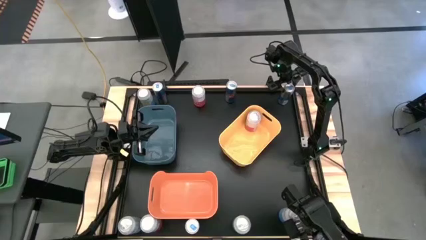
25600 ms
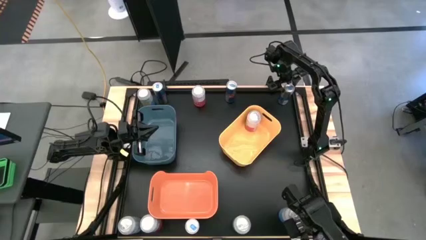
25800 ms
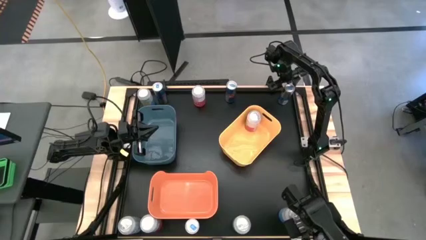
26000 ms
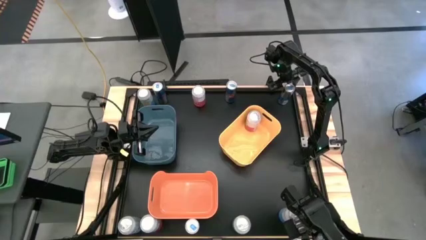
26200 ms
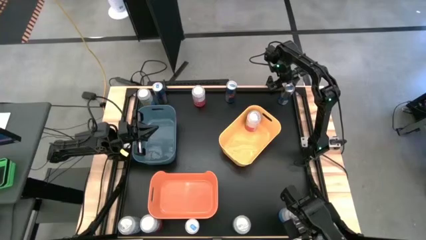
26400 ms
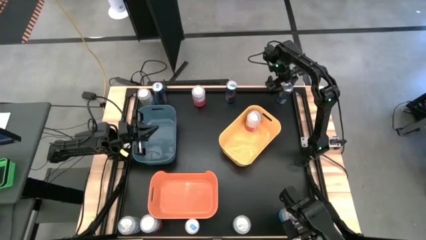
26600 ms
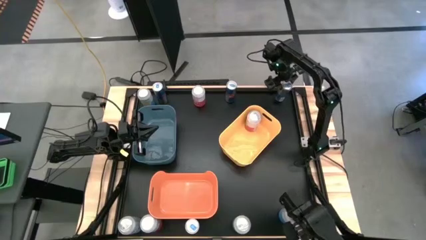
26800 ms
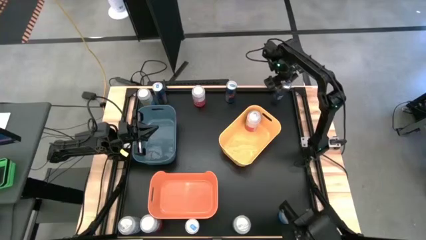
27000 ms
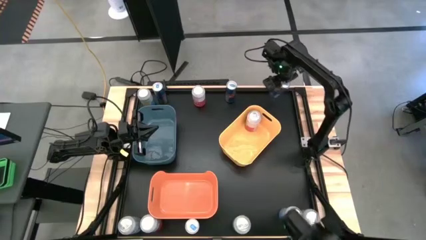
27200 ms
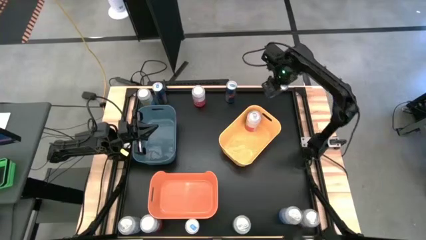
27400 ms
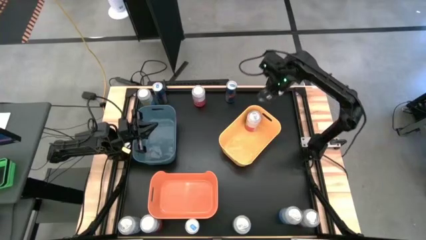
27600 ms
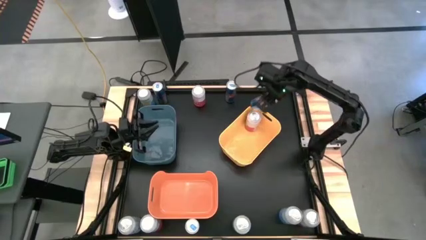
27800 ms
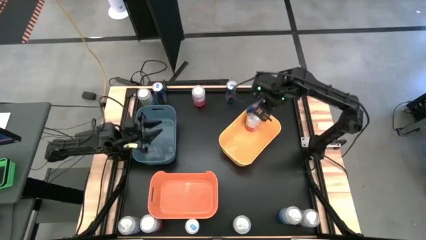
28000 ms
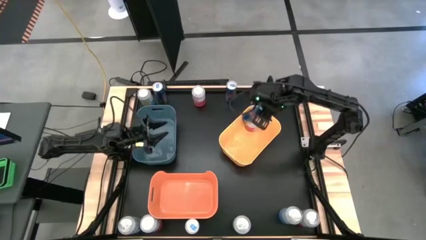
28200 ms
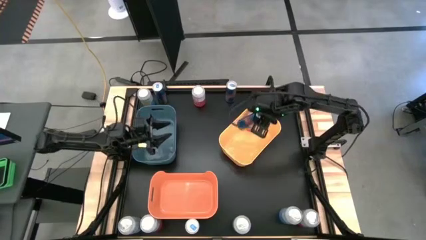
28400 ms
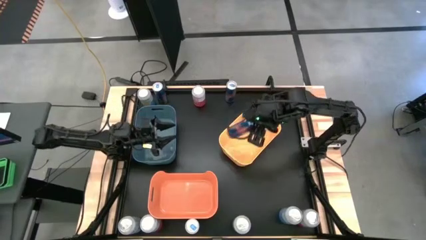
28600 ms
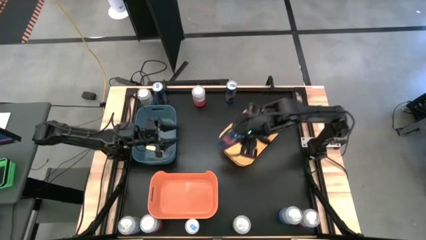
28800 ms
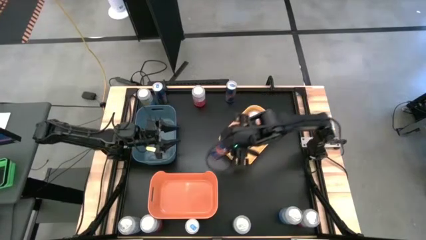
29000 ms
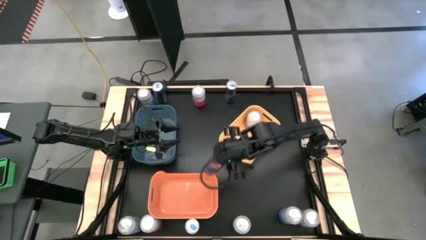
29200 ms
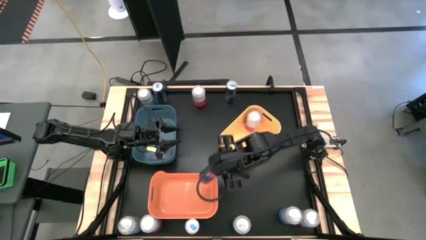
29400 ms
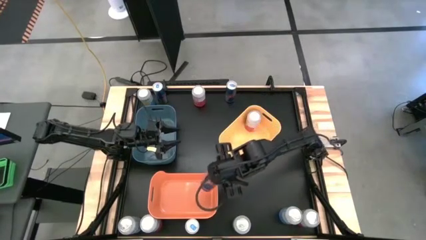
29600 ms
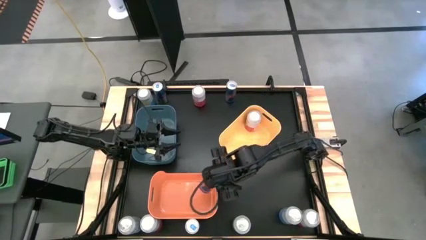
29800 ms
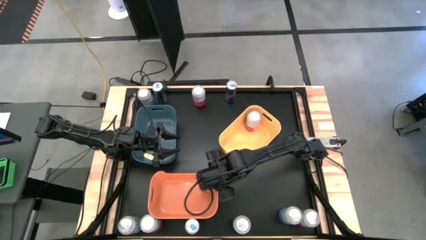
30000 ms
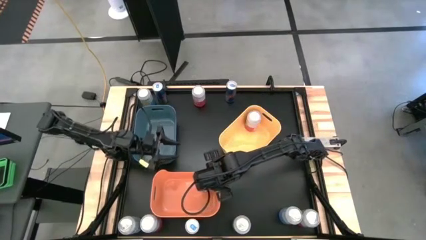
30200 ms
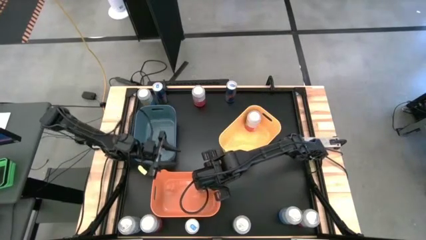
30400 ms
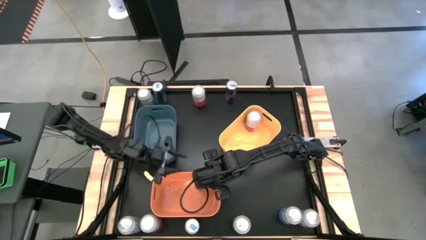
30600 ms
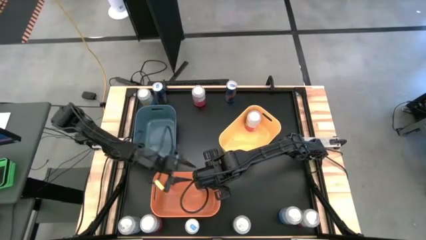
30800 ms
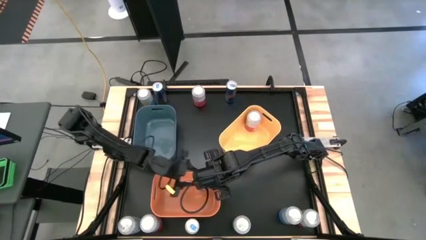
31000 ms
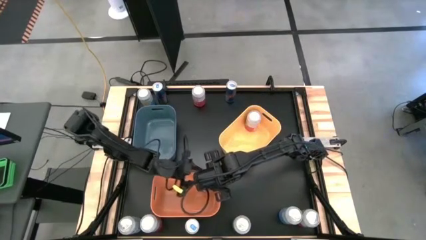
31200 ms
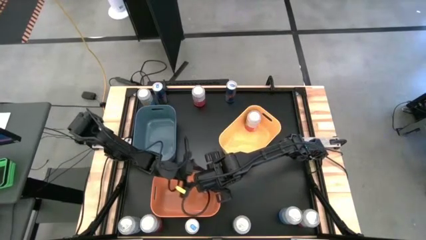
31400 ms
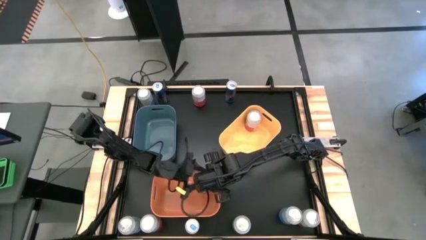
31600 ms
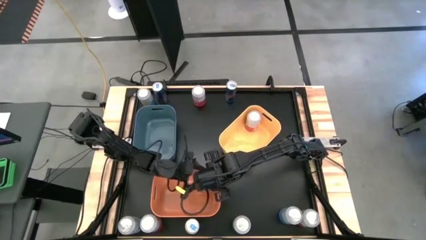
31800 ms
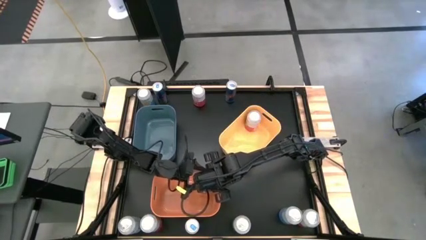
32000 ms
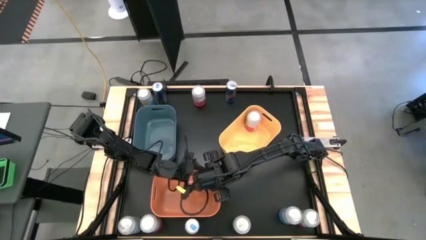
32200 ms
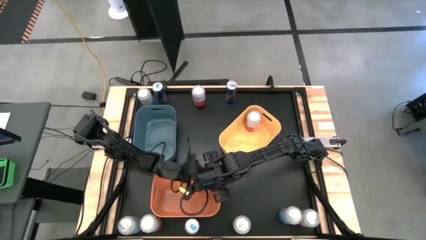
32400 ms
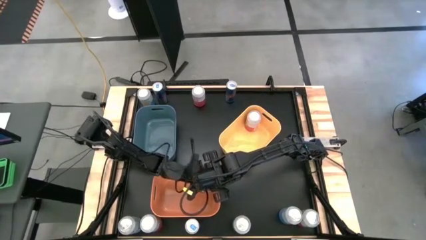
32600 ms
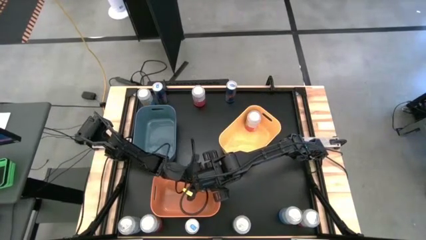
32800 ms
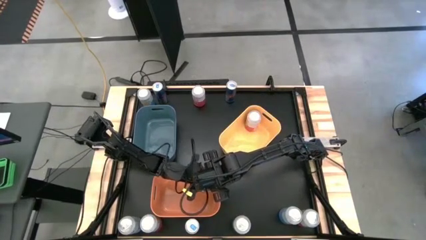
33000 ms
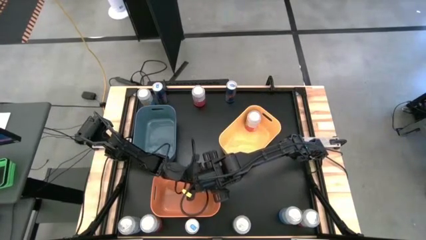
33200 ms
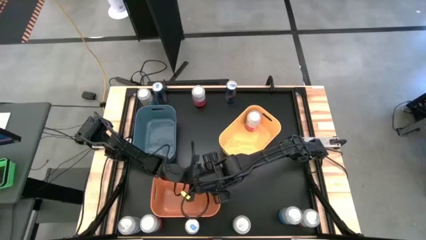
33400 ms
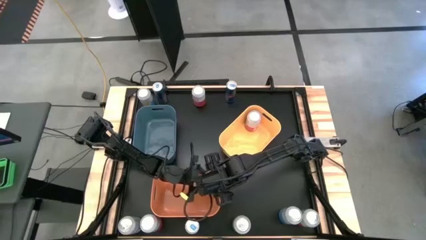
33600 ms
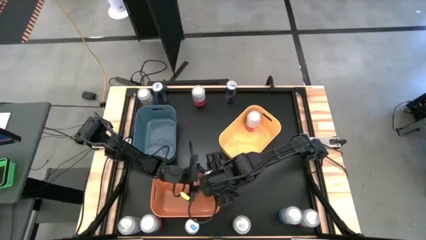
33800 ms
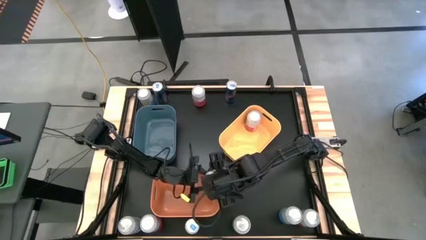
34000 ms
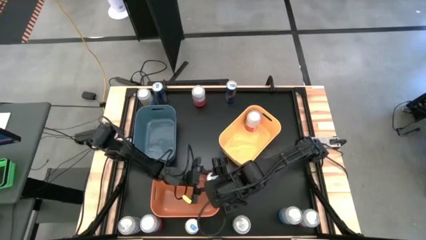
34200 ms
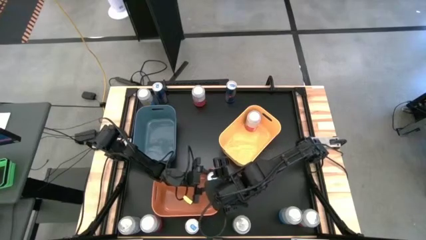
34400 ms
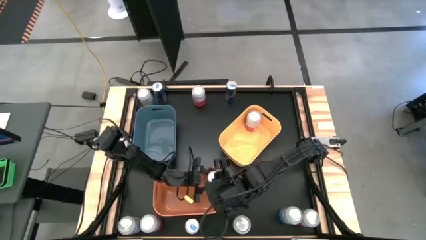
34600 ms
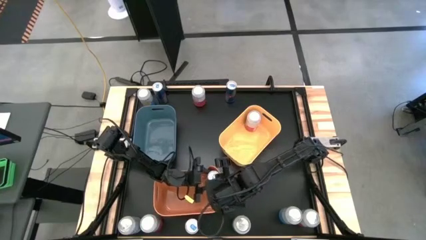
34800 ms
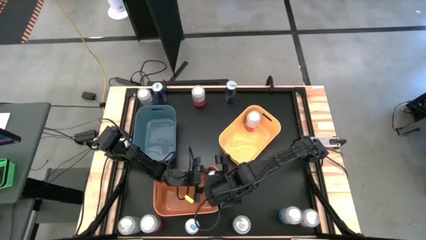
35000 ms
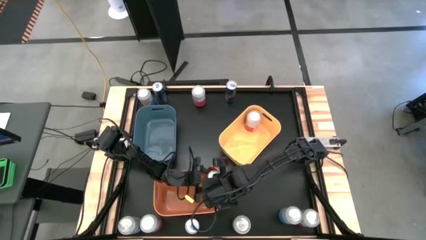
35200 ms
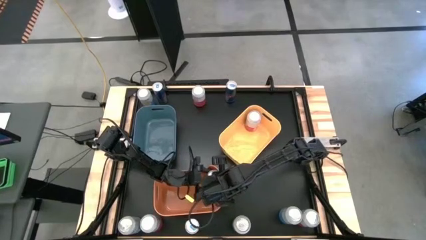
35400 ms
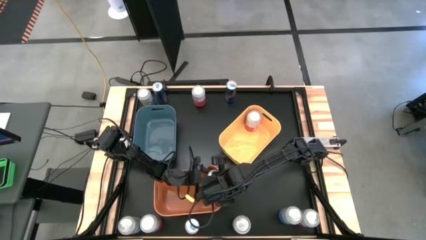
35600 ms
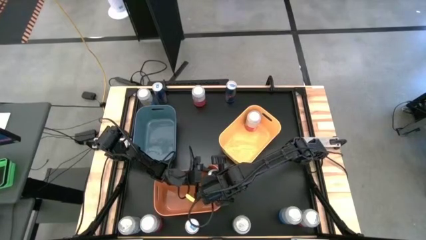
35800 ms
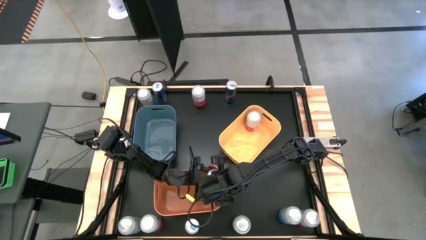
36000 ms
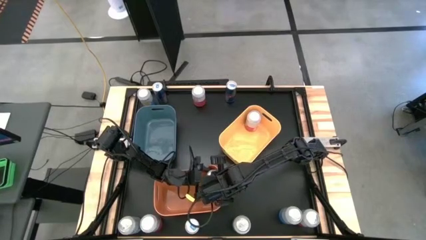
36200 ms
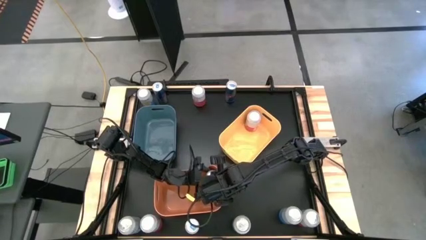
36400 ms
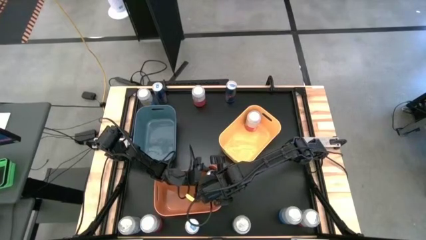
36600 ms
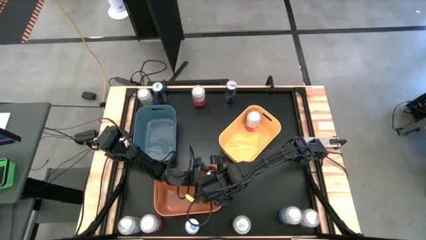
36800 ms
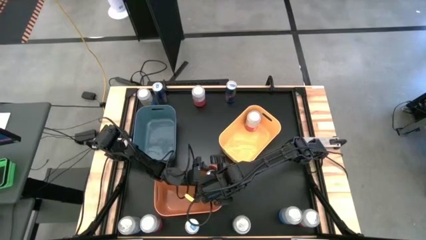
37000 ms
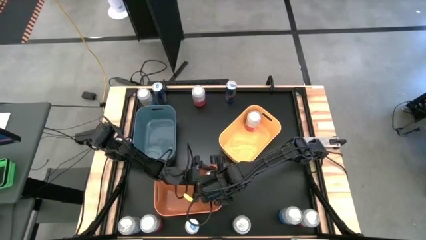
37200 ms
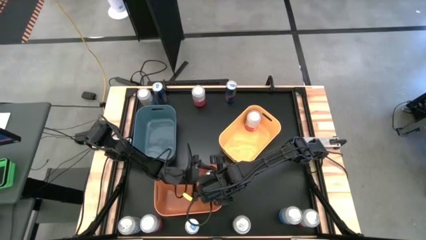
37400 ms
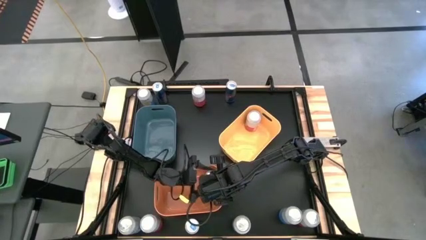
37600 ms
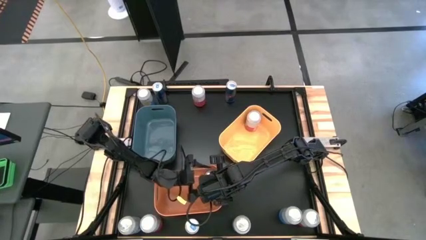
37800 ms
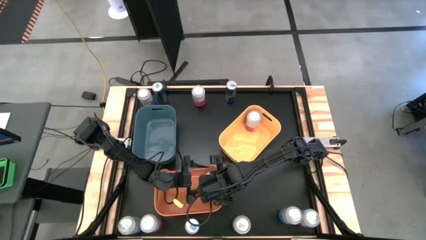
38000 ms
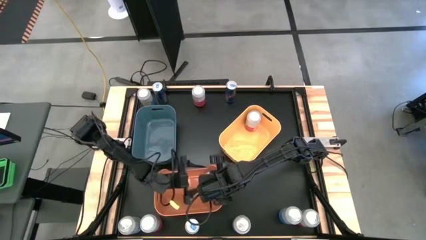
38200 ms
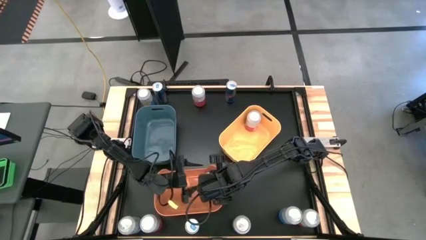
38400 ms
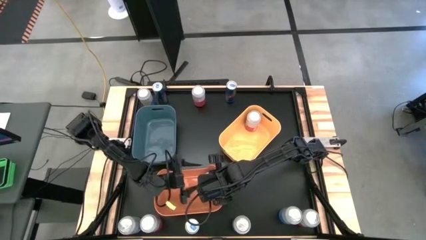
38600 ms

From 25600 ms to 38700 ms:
Task: Sort soda cans
Put the blue soda can into the orange bin

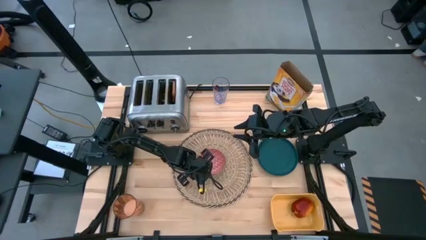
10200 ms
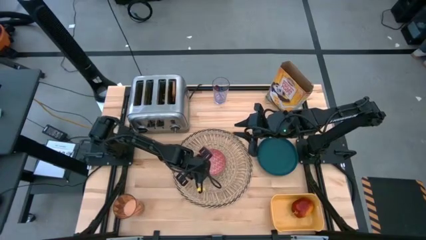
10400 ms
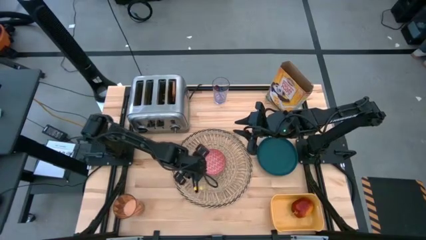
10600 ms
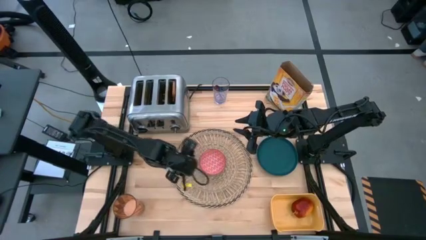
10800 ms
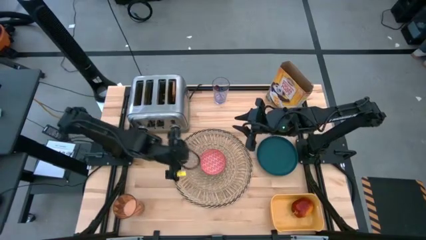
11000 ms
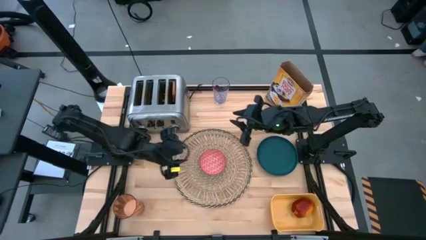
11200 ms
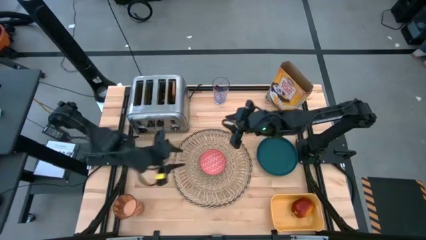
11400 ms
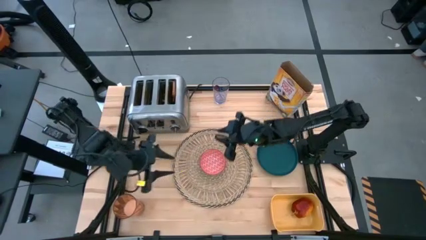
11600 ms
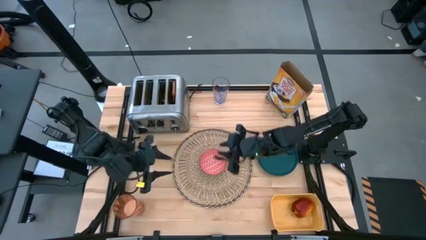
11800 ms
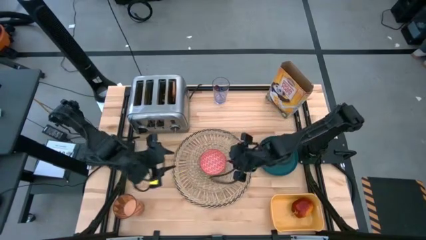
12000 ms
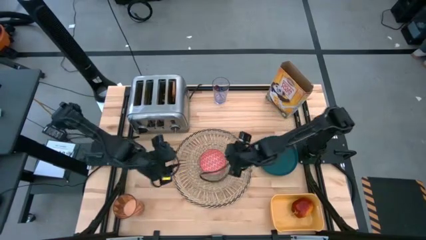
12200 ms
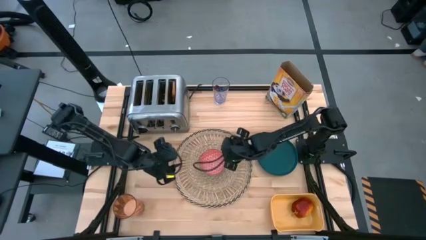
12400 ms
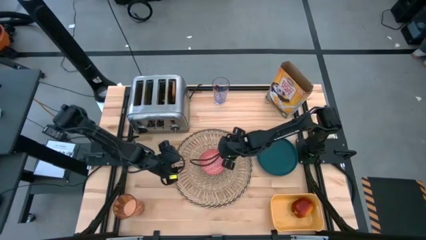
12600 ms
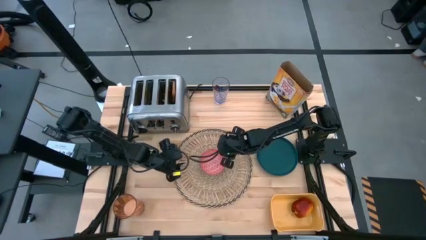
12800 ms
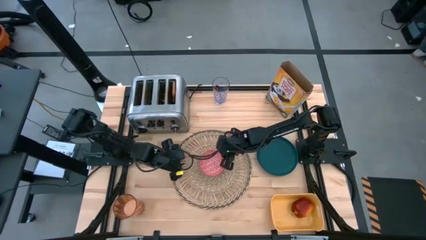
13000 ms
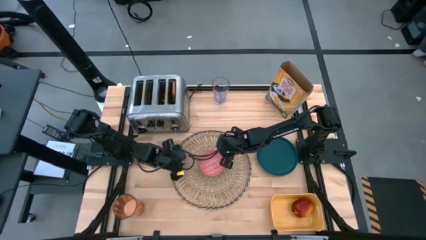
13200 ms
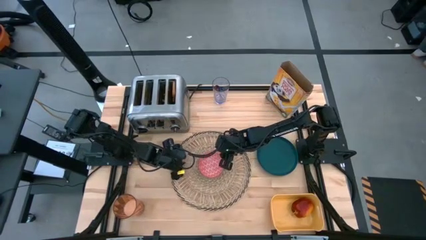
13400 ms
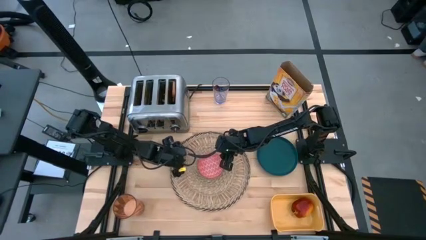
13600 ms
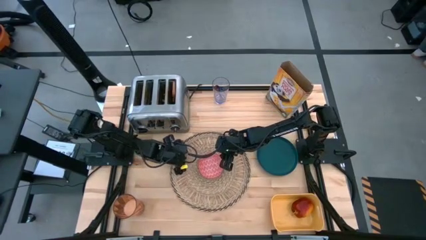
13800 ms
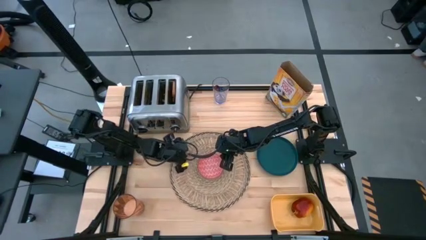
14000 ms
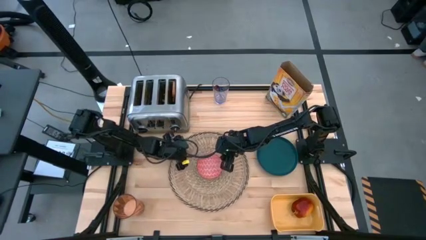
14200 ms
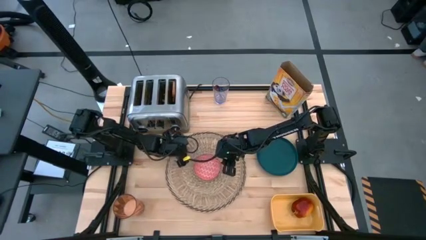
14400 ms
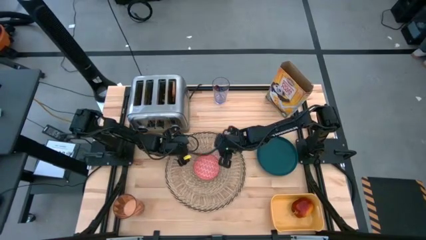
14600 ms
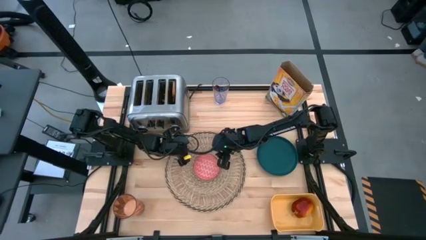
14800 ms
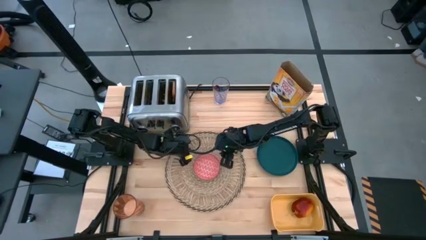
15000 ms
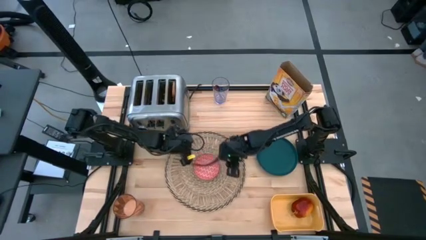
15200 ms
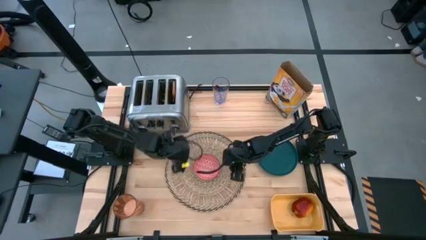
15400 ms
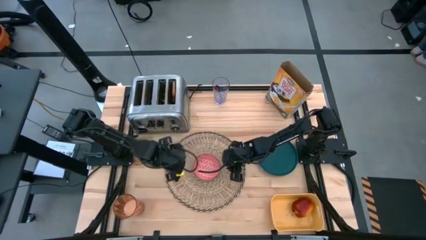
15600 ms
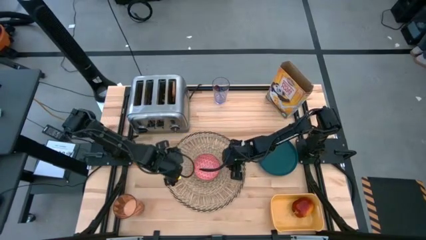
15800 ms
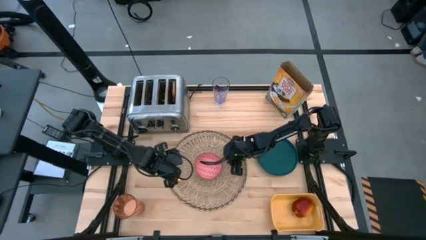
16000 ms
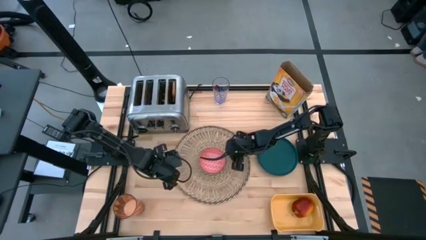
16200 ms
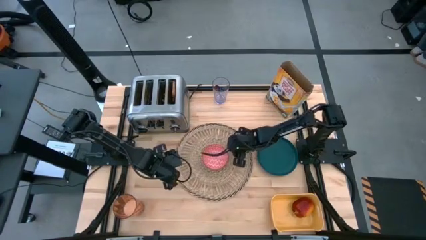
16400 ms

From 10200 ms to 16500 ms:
Task: Arrange a breakfast setting
Adjust the brown placemat
